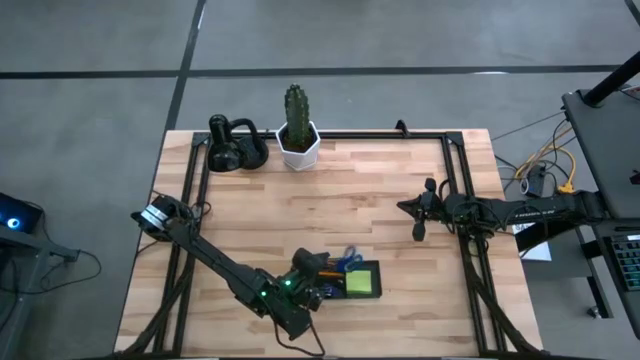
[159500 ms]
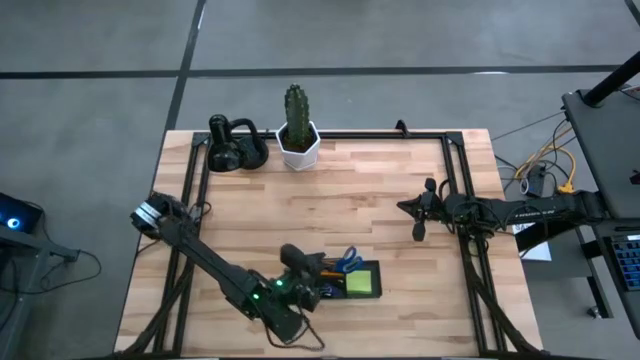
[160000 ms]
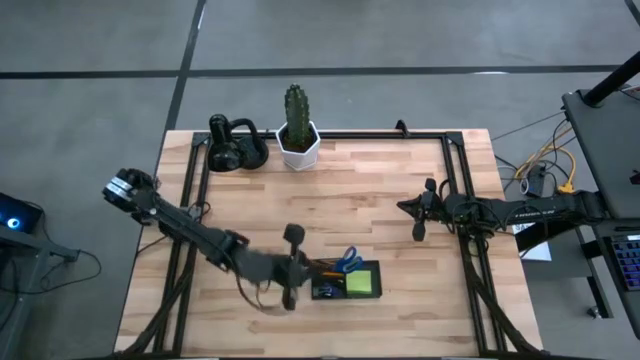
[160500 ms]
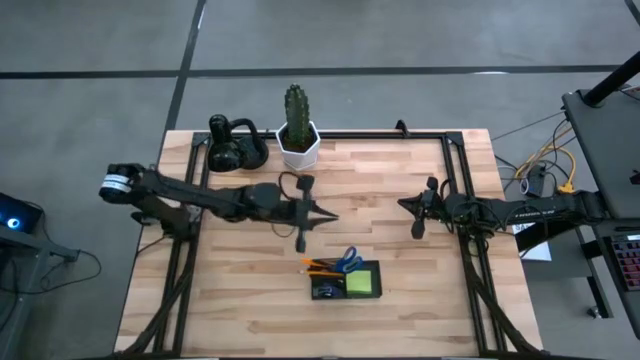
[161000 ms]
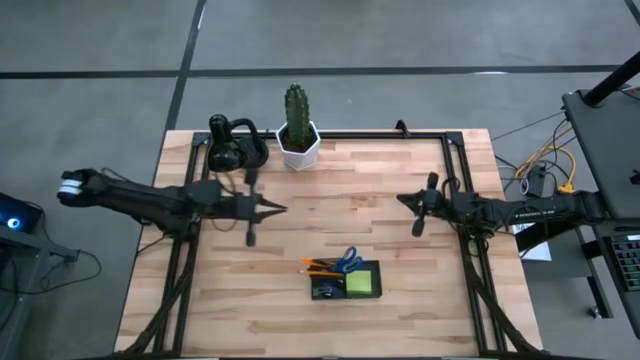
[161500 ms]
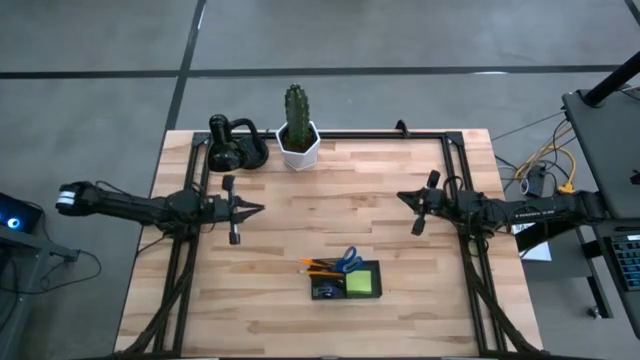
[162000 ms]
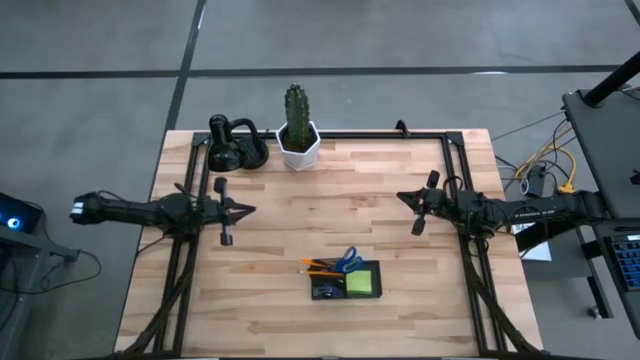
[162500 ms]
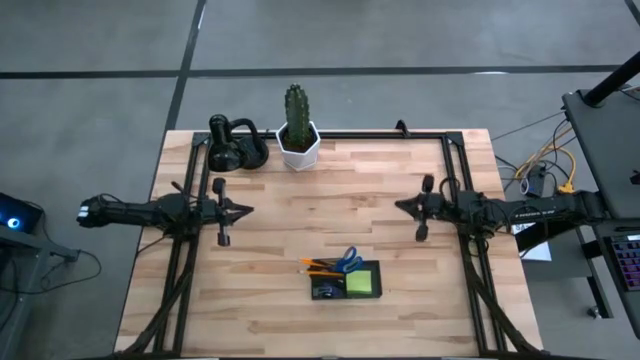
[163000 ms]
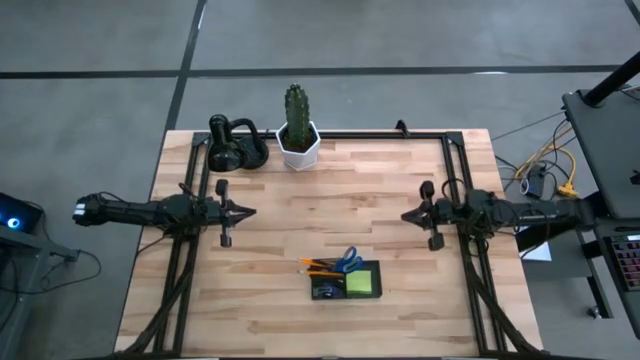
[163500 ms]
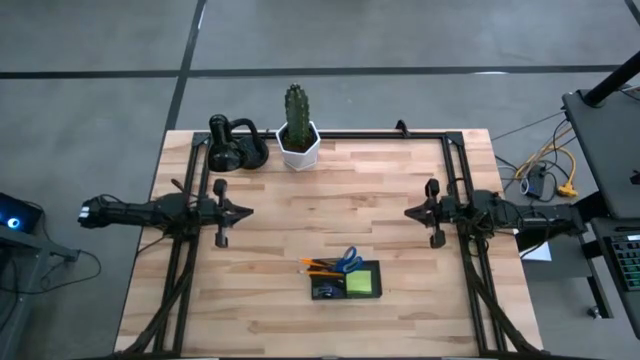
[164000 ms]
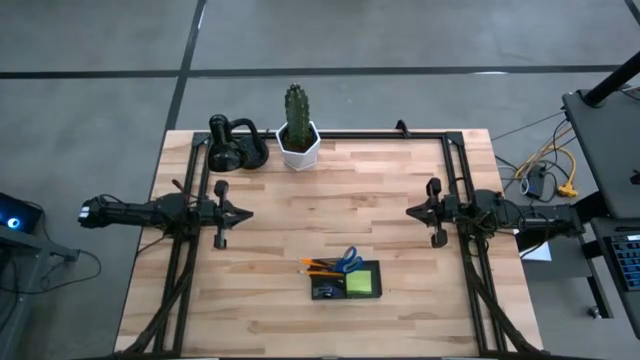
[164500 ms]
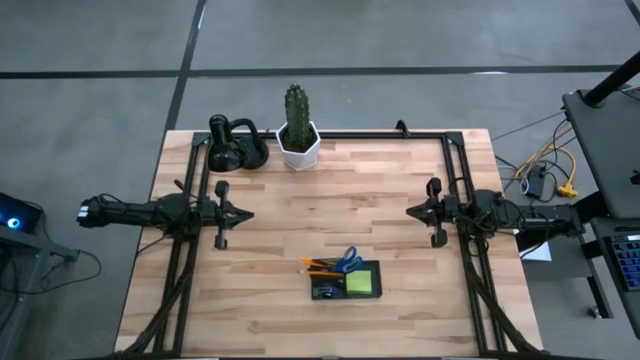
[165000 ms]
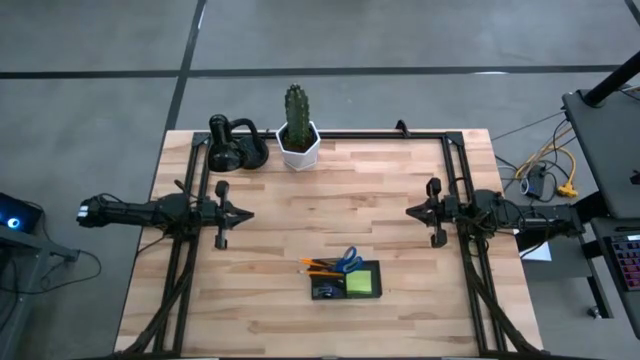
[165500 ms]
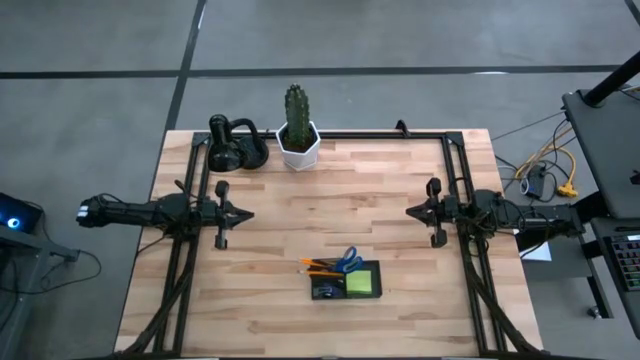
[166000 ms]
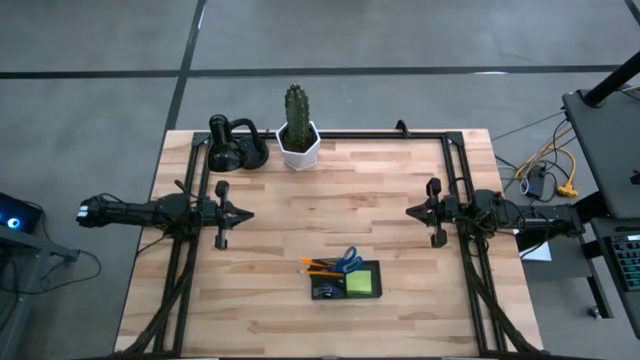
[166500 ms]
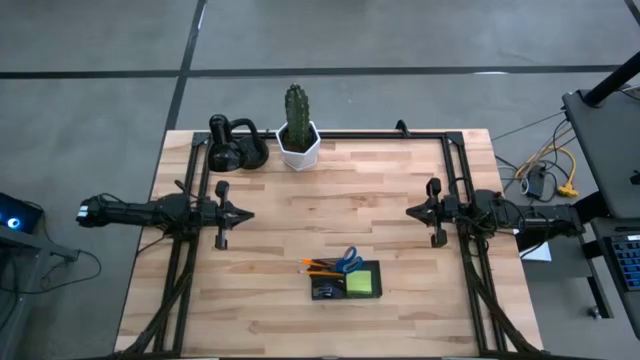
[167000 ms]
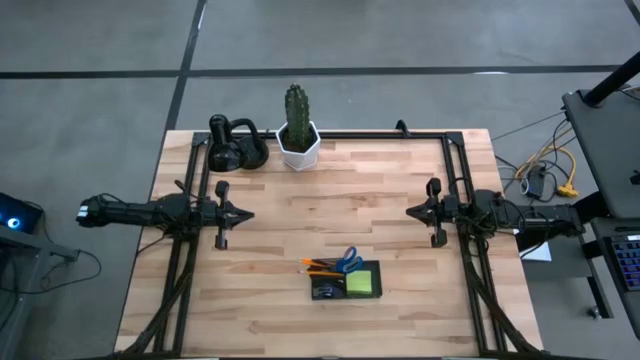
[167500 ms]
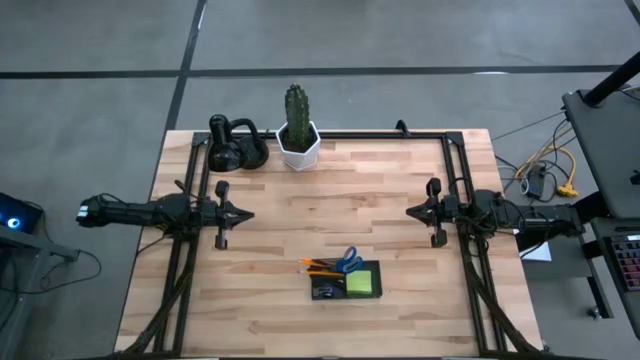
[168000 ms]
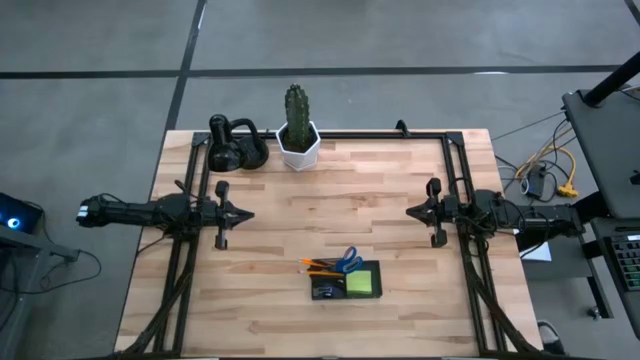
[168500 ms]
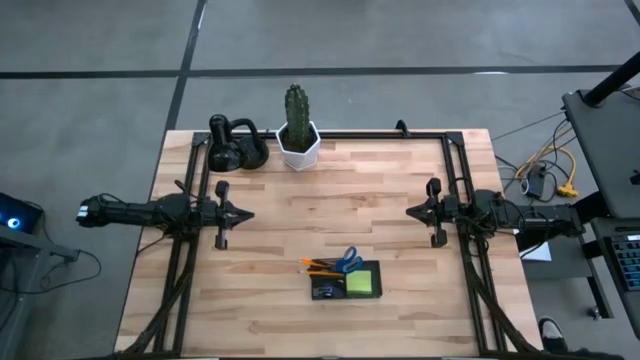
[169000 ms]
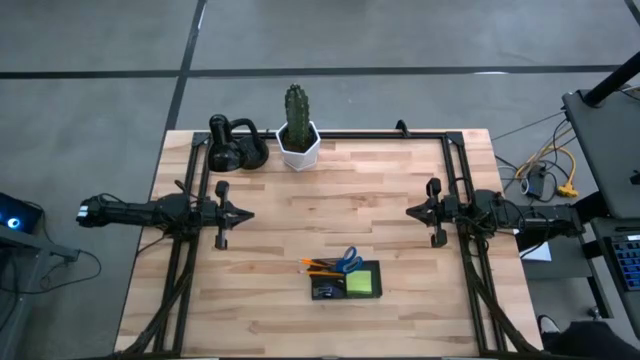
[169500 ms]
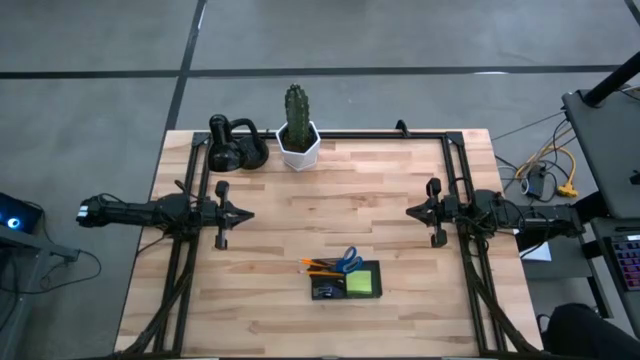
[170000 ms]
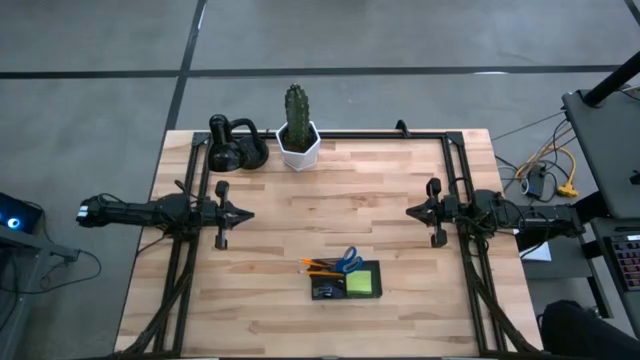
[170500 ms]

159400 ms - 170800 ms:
Task: Pick and place office supplies into organizer
Return to Home Position

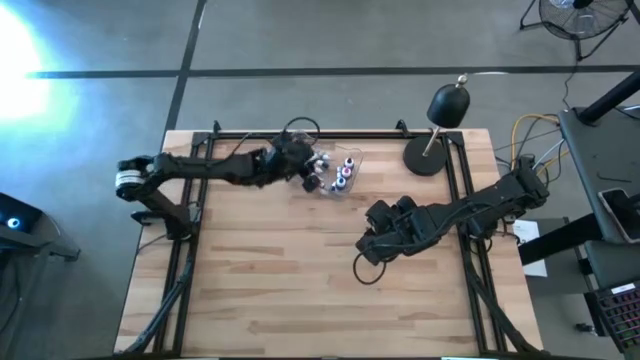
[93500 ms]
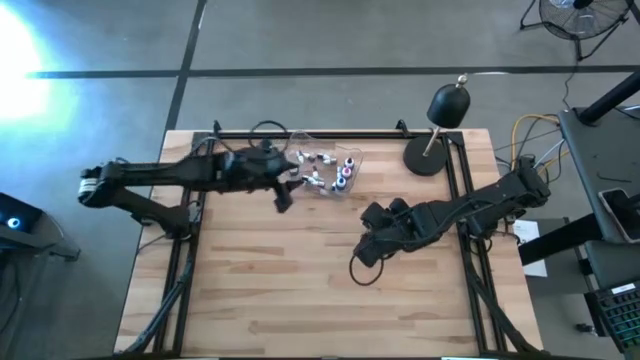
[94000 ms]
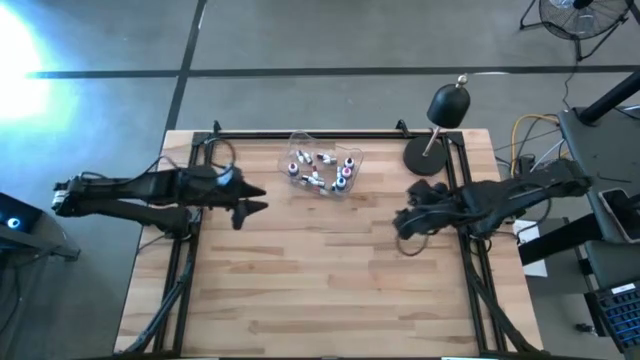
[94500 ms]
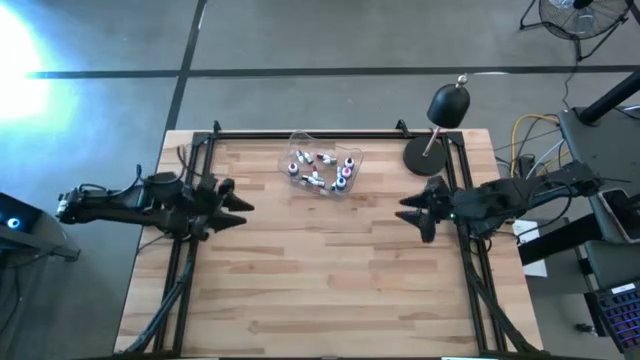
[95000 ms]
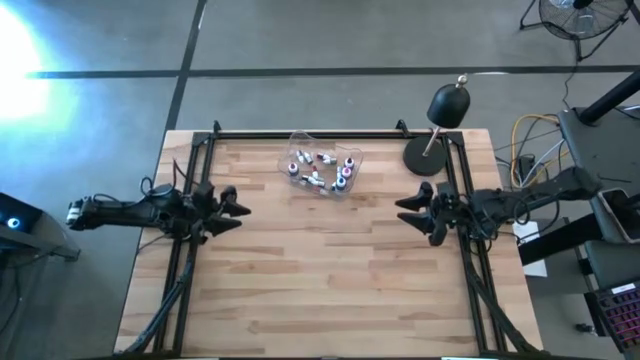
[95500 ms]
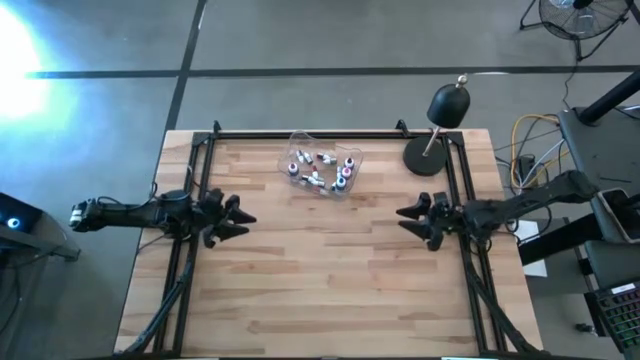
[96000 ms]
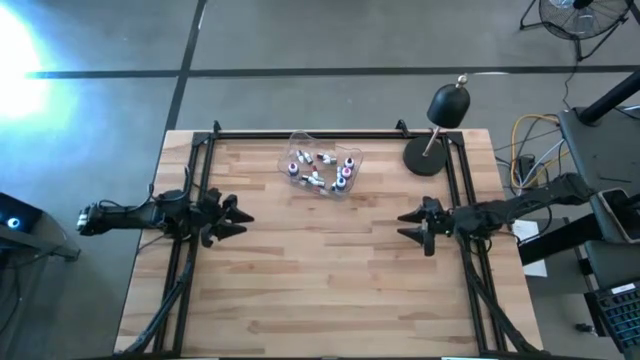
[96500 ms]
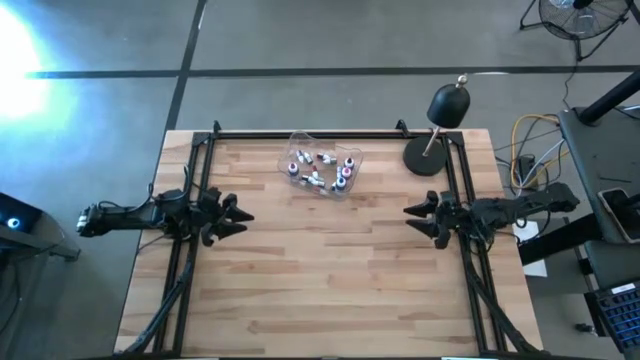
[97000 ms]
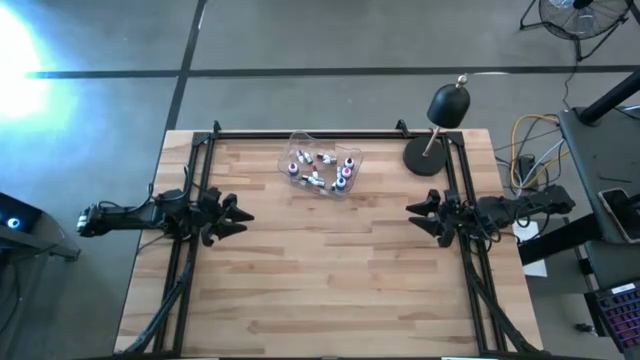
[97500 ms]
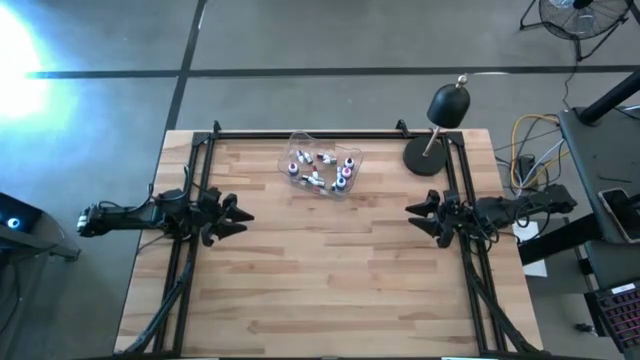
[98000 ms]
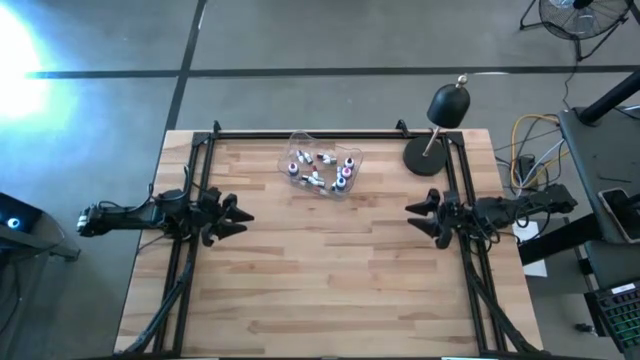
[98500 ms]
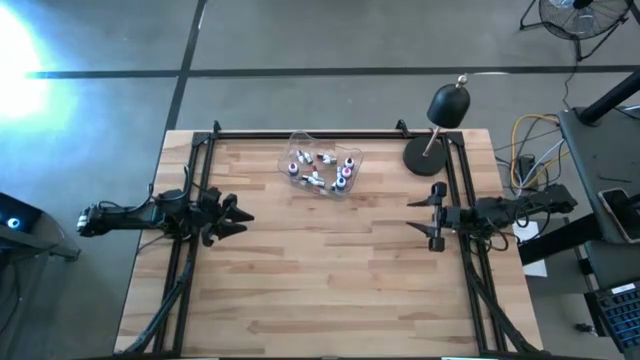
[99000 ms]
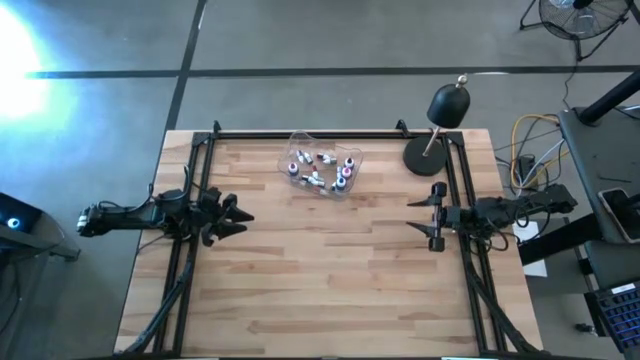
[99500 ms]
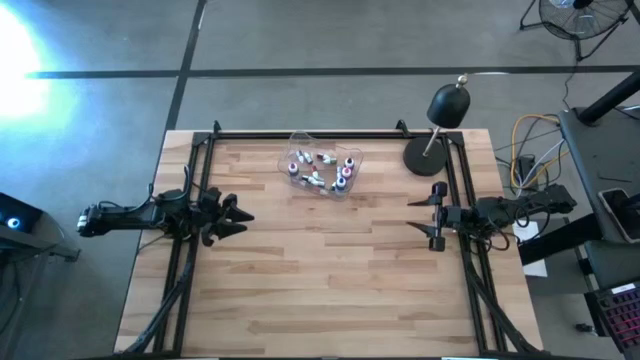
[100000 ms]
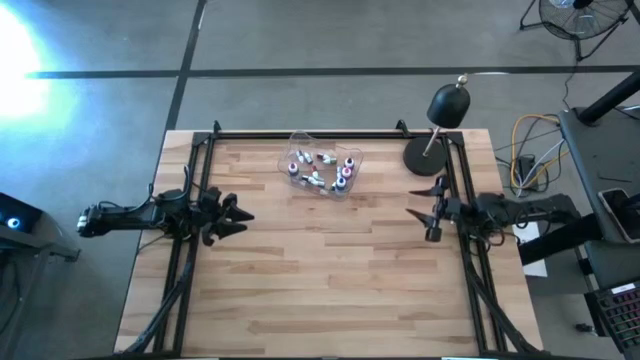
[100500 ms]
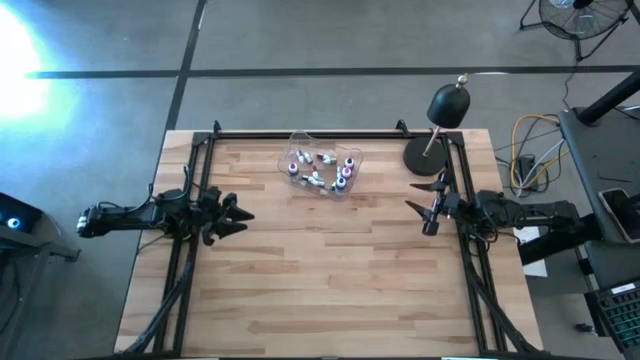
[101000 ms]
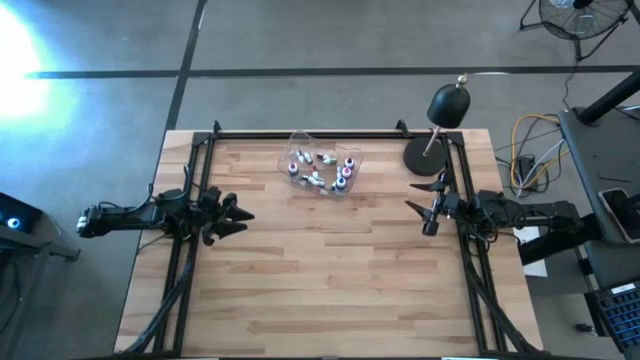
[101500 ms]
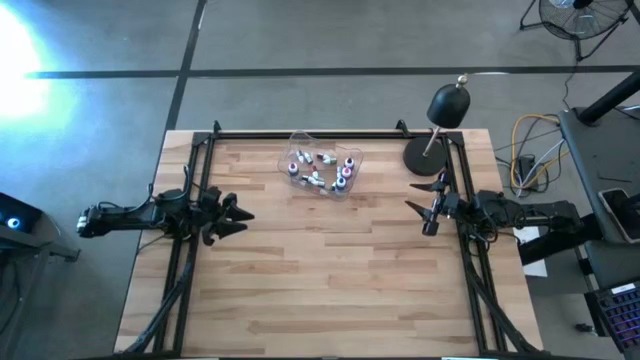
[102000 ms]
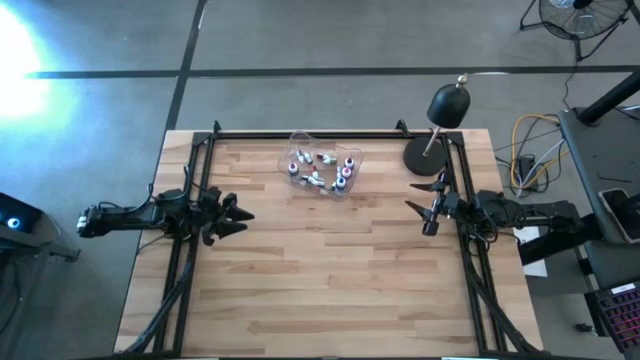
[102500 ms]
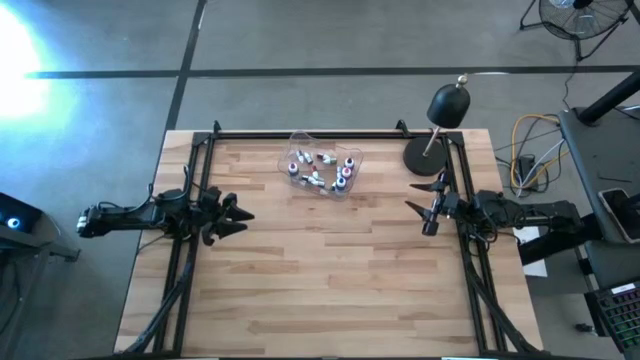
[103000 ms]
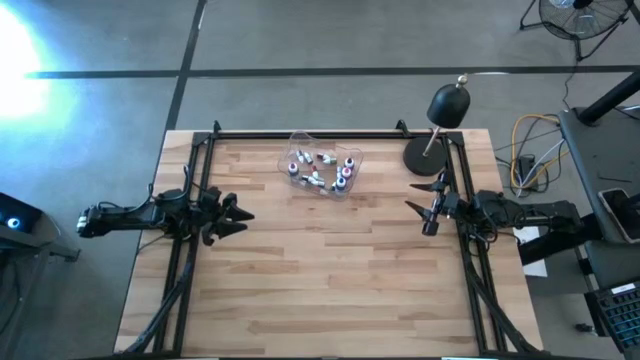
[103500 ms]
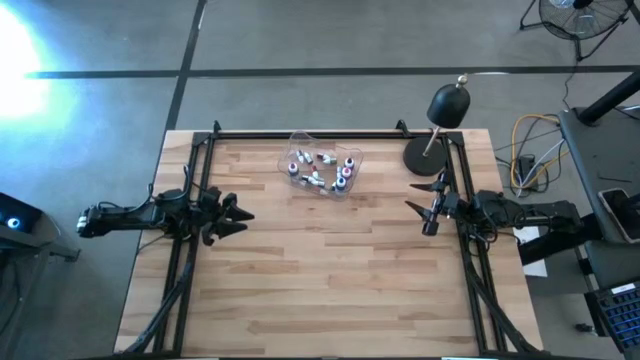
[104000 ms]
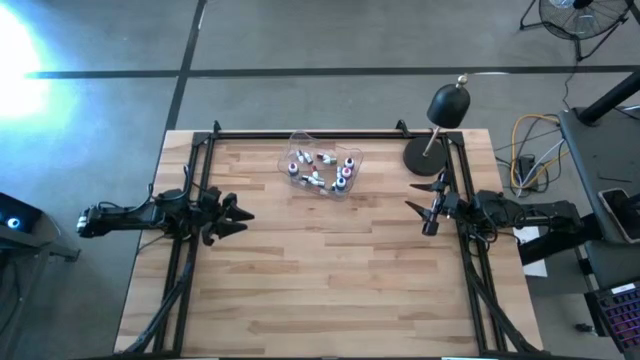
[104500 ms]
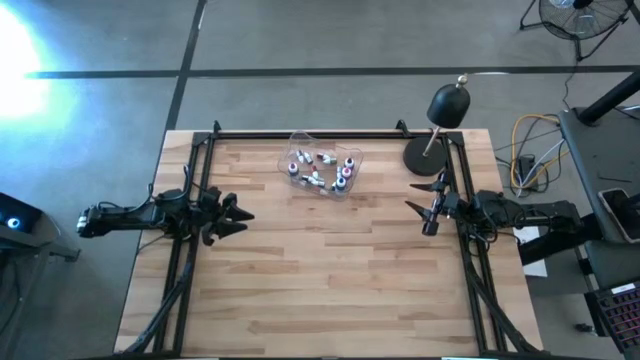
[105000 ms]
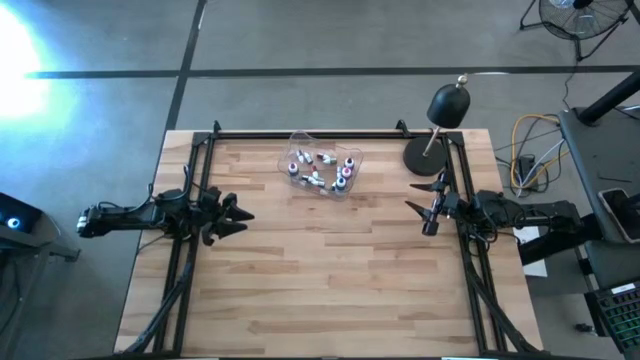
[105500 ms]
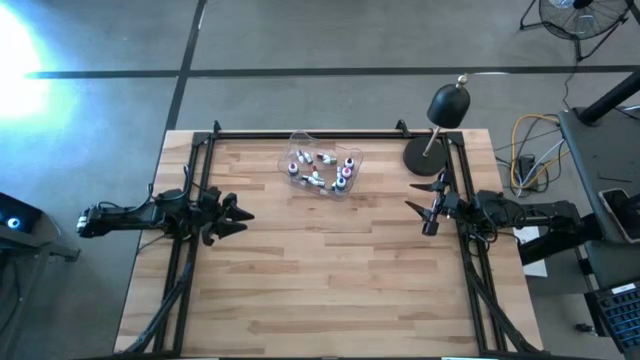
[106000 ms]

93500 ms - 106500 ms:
Task: Pick & Place food coloring
Return to Home Position
